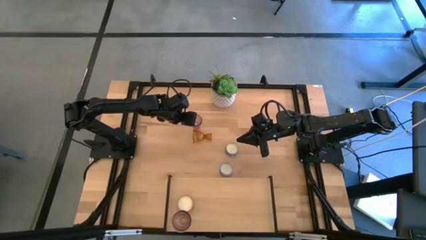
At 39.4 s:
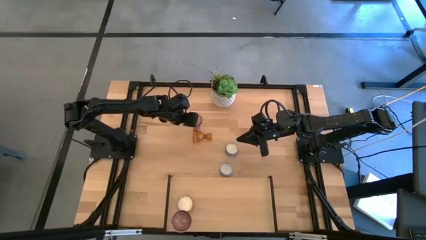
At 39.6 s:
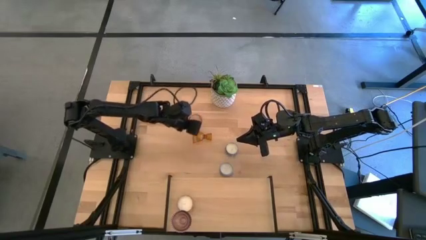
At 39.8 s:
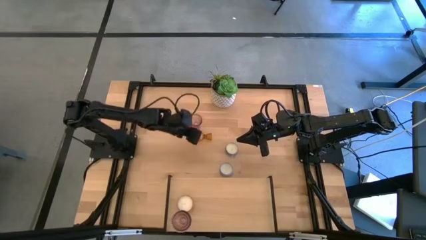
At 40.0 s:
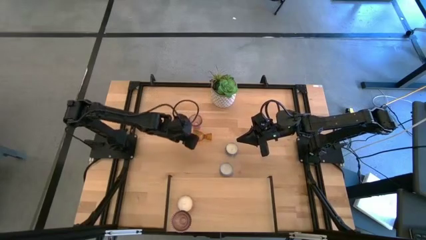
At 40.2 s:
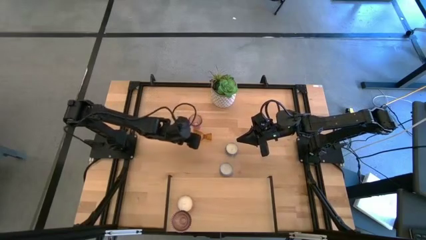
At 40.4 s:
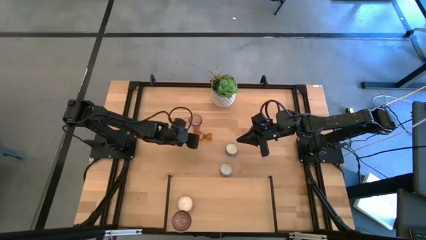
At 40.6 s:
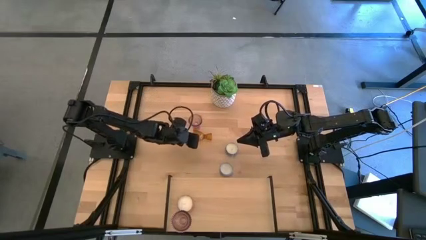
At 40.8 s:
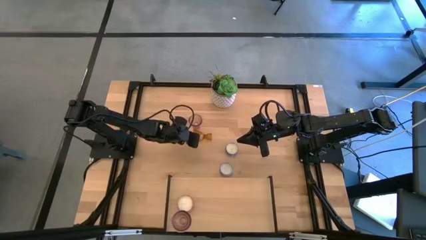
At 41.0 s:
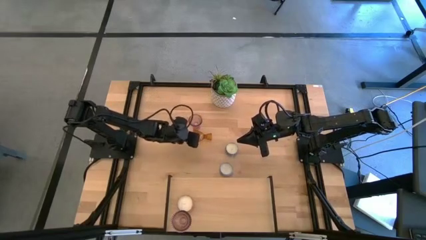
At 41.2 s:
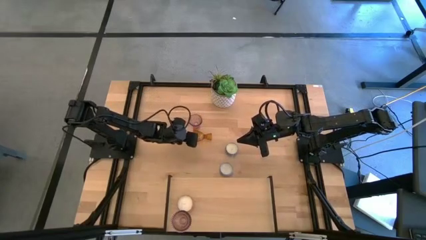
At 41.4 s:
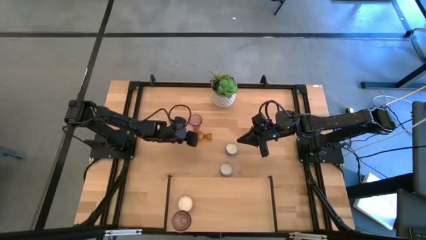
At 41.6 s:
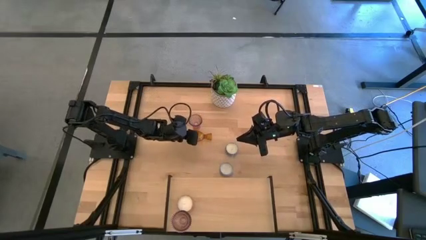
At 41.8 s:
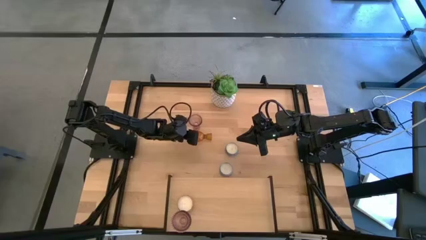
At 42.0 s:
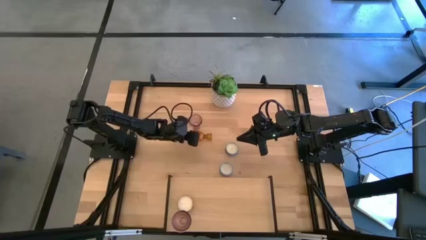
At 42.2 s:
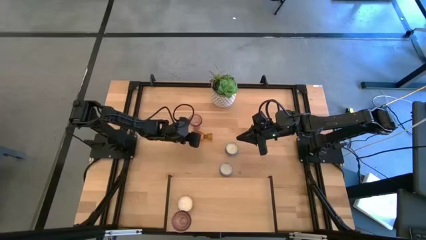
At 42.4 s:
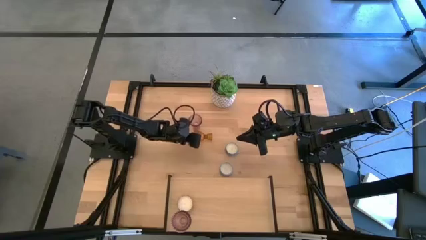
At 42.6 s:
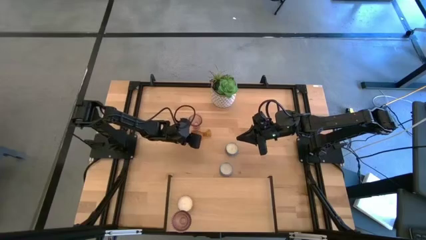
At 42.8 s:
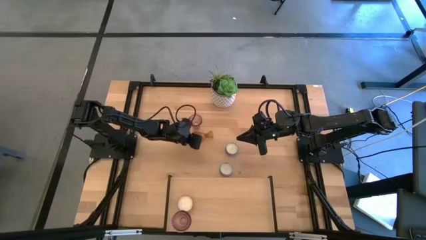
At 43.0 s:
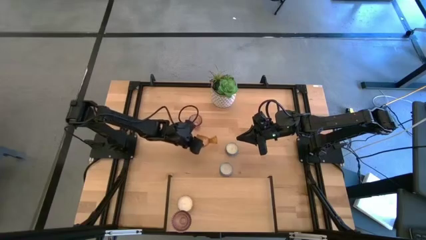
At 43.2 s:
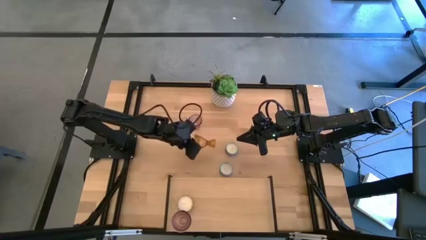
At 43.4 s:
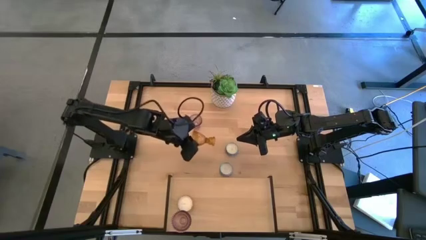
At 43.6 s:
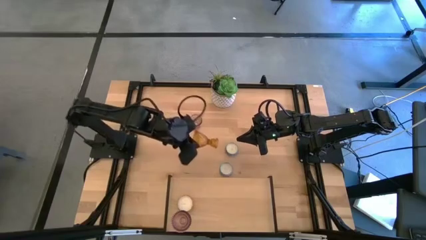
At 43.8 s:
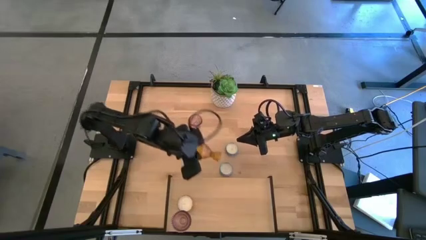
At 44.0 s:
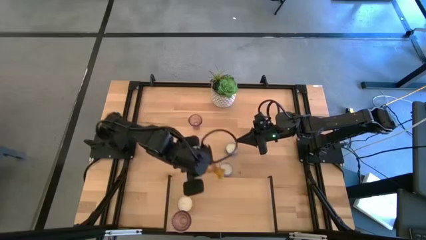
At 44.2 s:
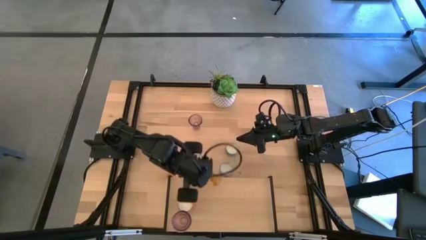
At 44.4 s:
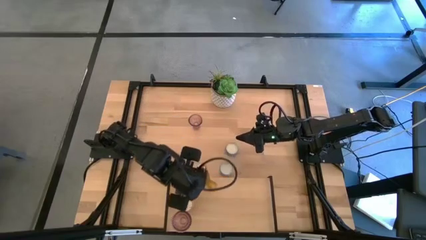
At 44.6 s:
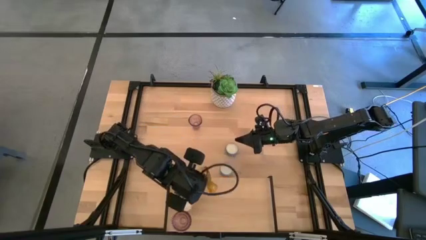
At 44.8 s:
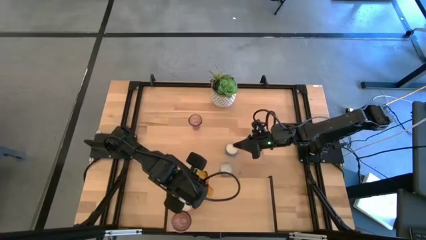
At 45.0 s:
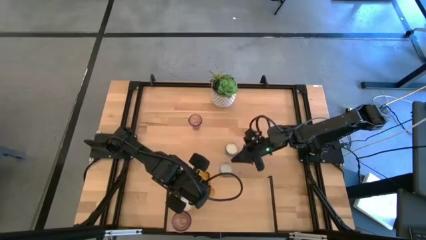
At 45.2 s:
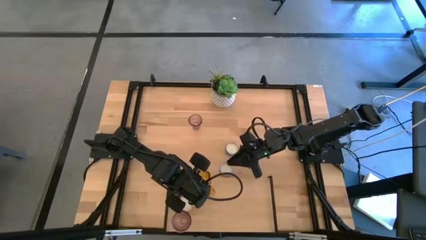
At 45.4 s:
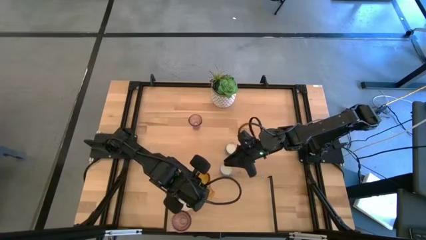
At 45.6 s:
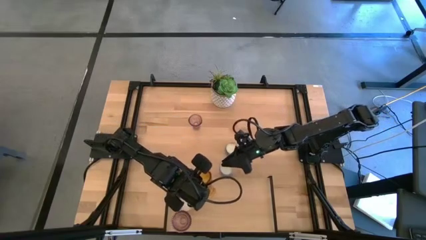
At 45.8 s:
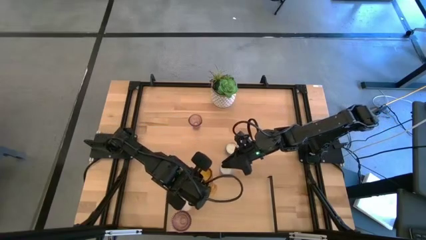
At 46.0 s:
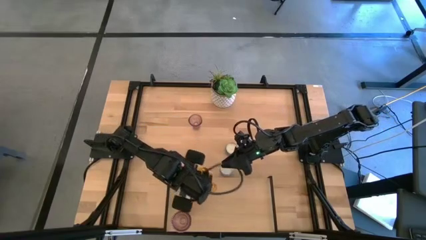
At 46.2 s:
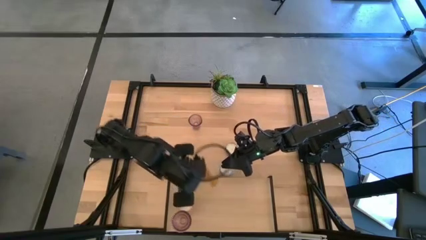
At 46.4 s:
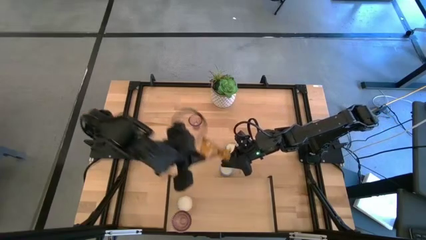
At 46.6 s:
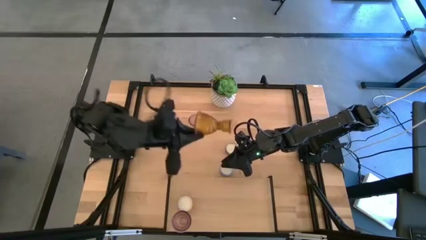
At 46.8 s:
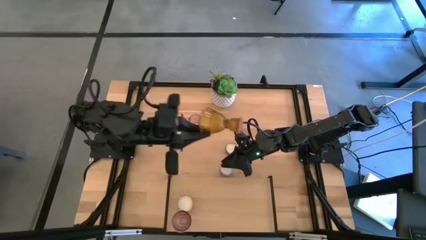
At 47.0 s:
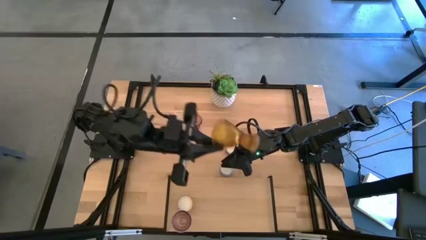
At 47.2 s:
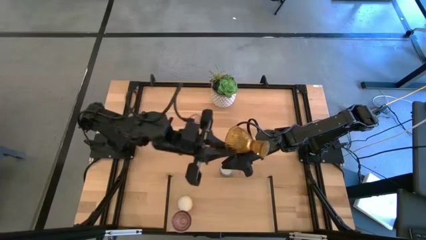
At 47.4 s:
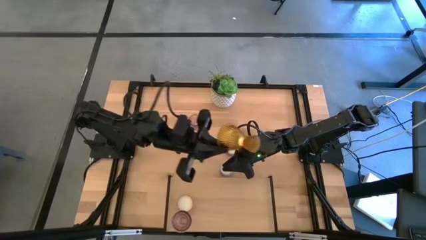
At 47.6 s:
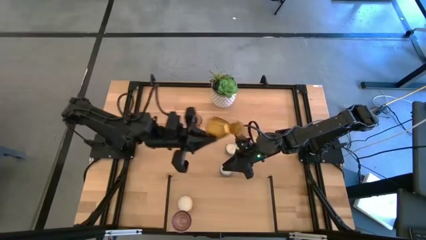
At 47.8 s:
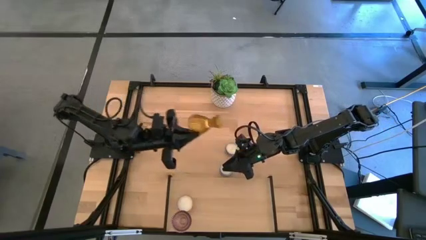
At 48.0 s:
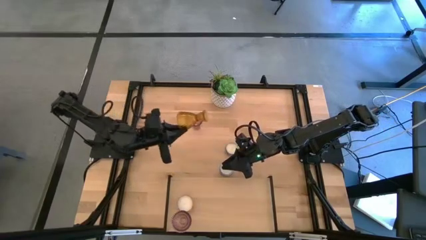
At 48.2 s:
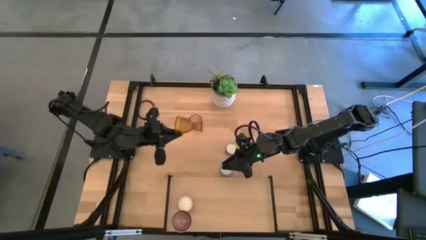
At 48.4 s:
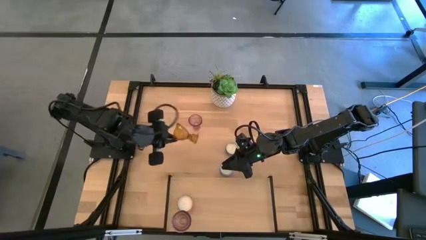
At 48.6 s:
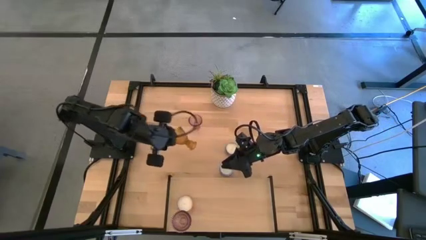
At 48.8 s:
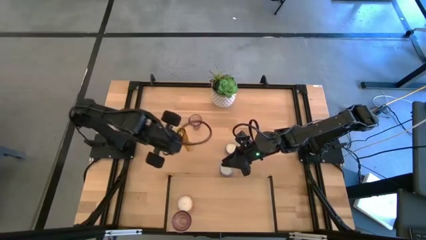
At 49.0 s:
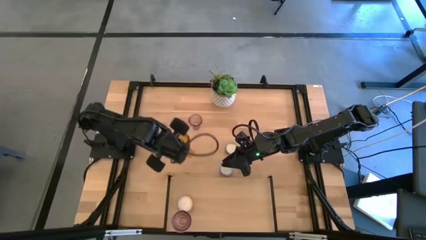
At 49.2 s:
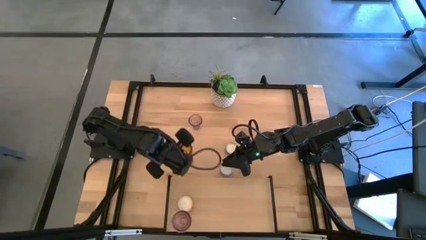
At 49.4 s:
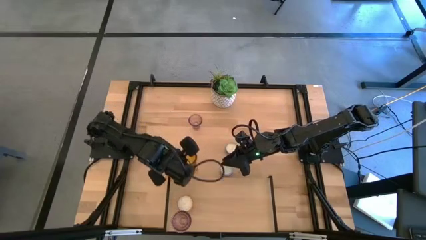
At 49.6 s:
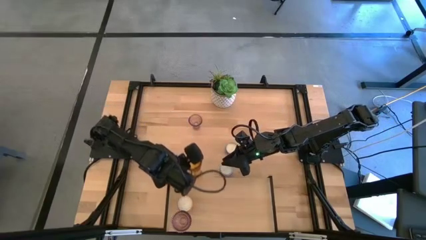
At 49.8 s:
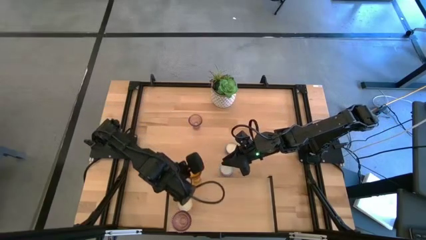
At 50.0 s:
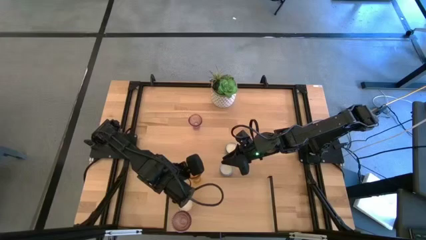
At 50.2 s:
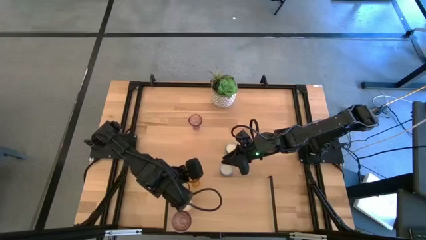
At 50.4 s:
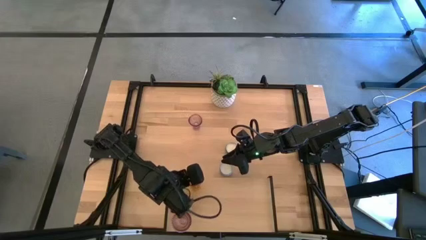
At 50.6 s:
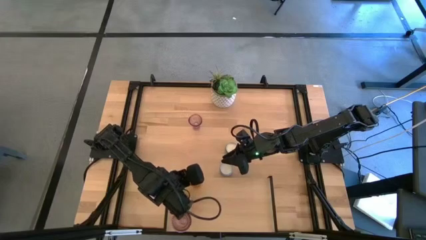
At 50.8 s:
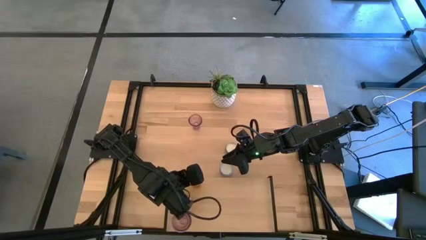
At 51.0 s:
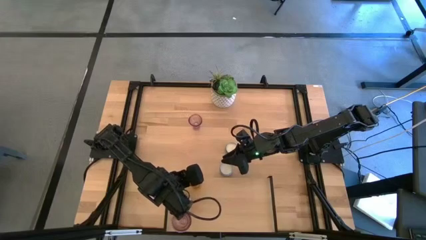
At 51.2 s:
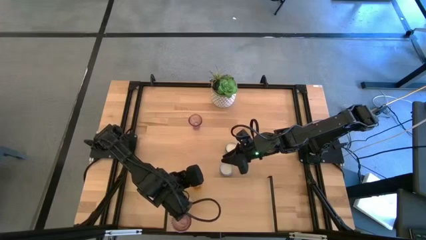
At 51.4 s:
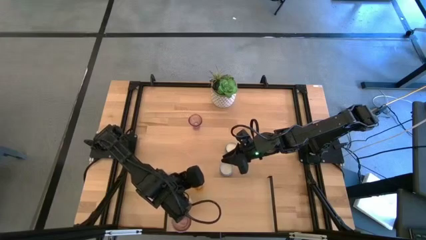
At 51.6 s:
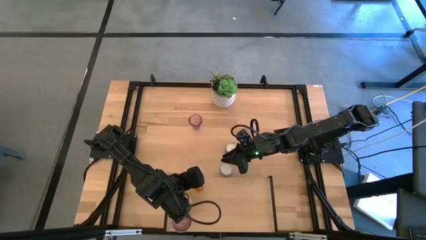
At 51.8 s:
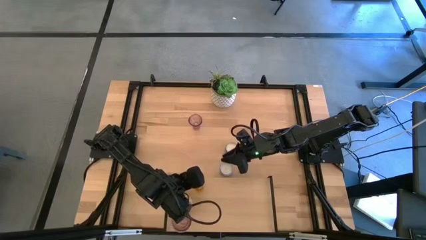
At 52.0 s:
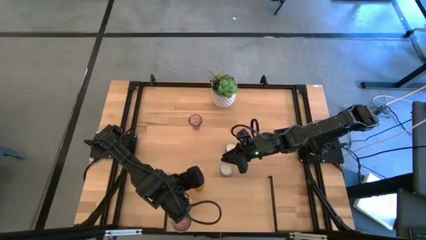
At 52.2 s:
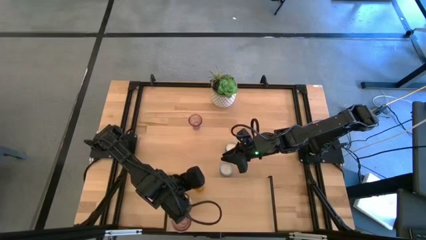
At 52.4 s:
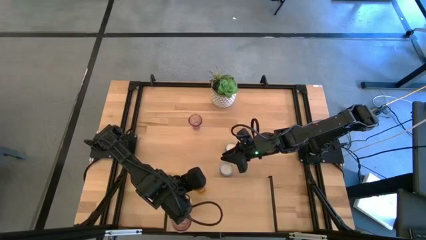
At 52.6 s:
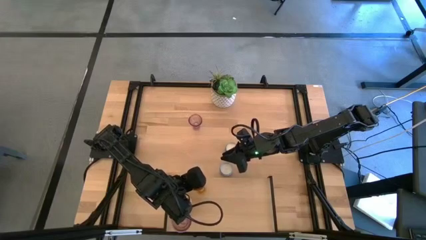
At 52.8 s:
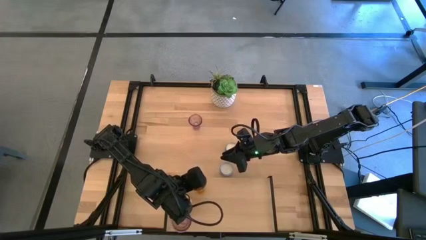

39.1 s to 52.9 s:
Task: Pick & Place candle stick holders
Put the yellow candle holder on the shelf

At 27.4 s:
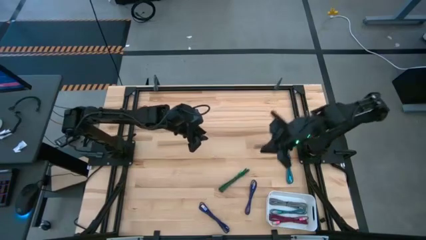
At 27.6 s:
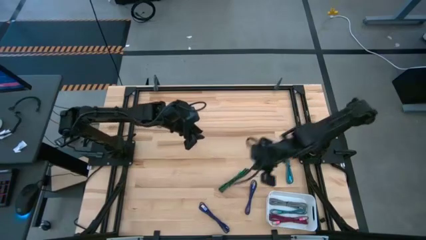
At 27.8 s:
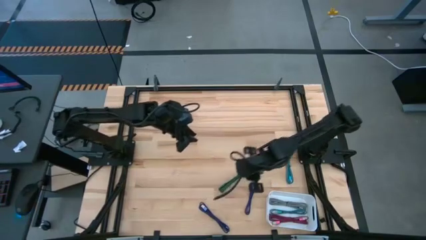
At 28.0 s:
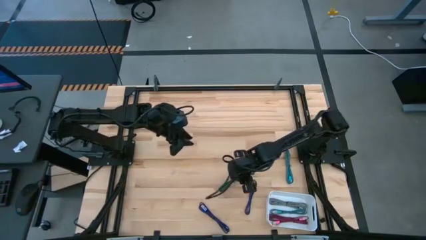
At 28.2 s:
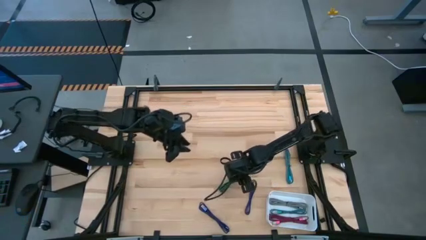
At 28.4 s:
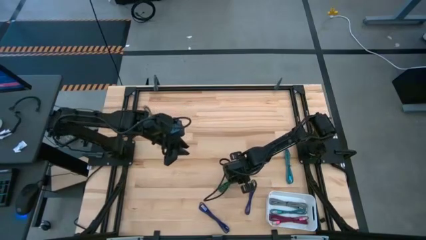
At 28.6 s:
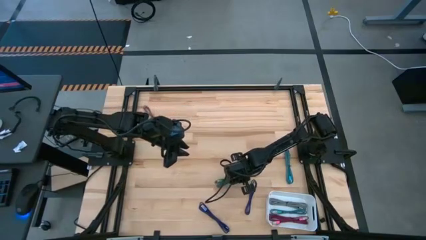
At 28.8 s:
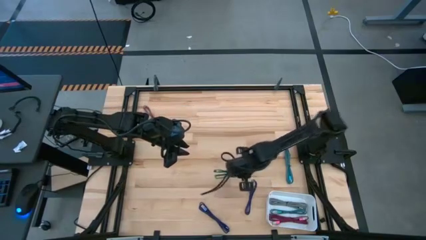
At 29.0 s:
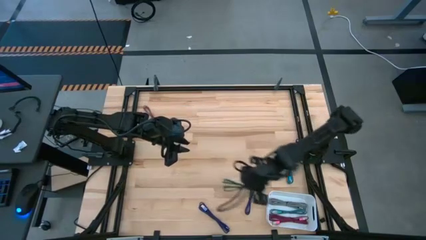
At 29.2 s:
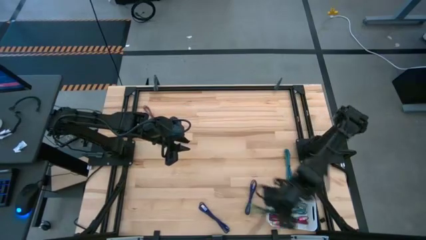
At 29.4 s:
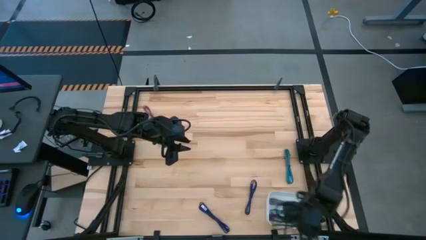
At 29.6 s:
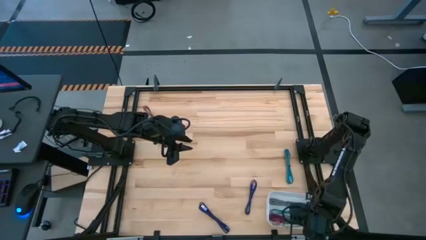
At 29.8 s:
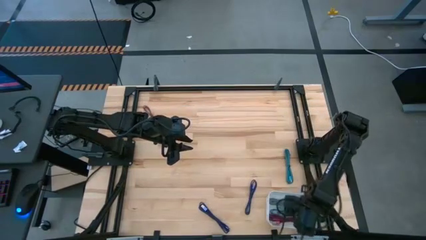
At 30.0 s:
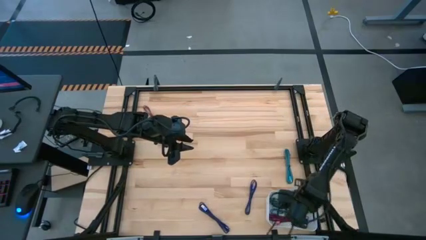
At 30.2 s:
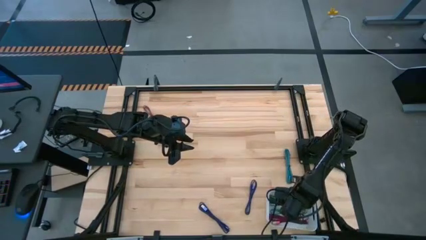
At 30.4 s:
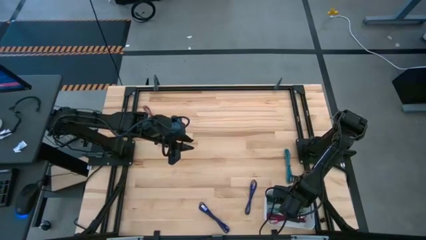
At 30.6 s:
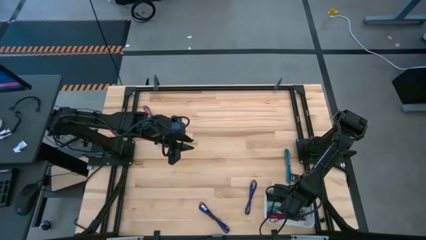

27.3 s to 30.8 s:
Task: Pick and place USB-C Cables
Put the green USB cable into the white bin
